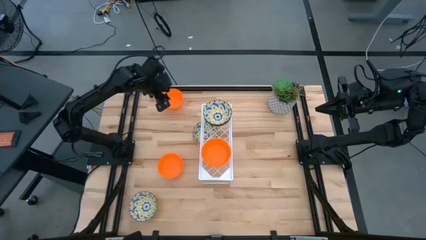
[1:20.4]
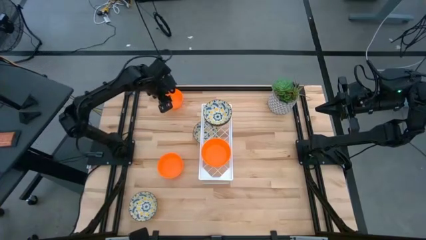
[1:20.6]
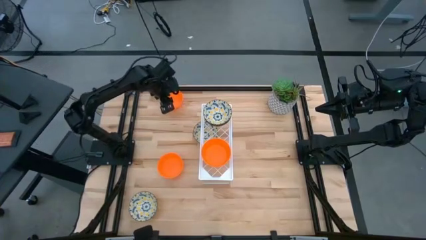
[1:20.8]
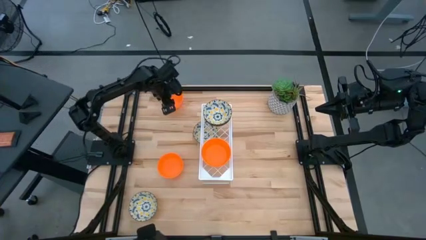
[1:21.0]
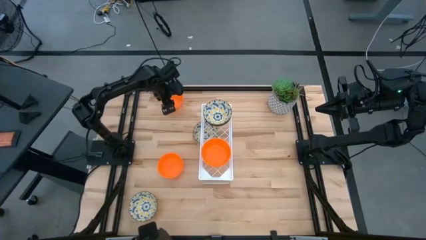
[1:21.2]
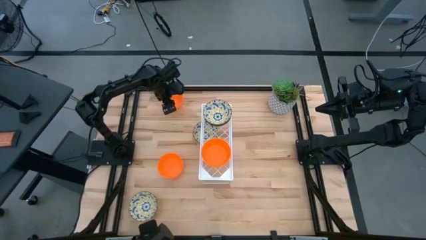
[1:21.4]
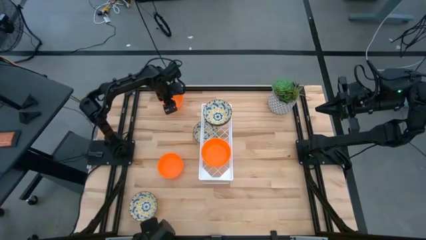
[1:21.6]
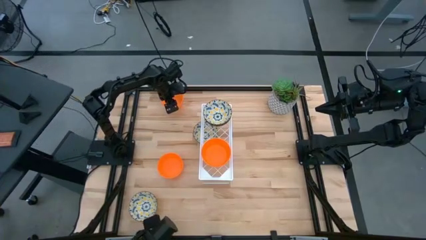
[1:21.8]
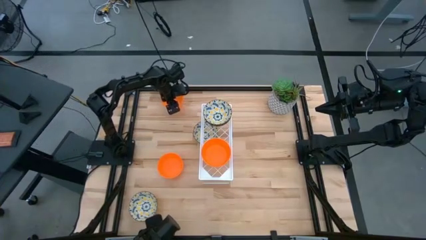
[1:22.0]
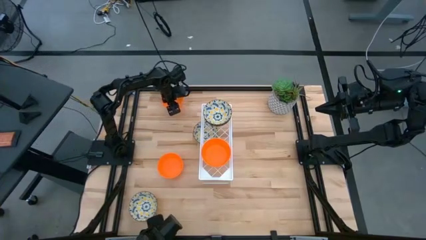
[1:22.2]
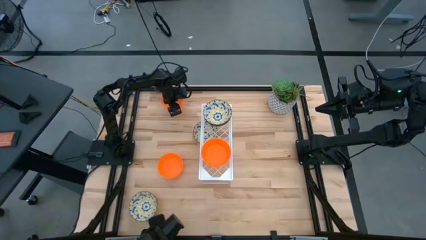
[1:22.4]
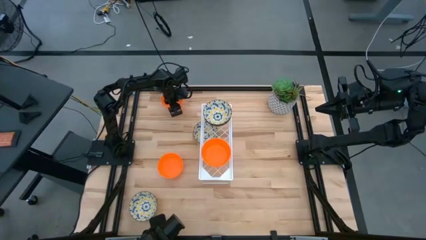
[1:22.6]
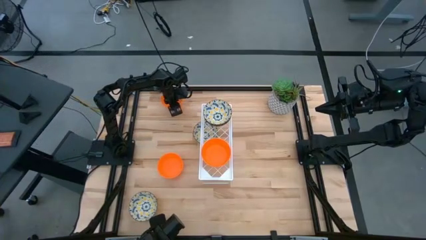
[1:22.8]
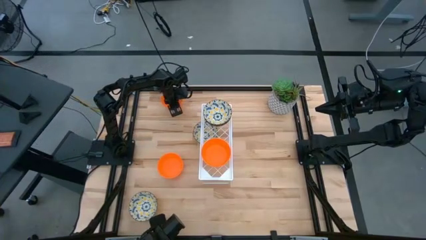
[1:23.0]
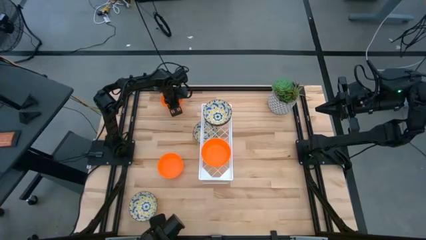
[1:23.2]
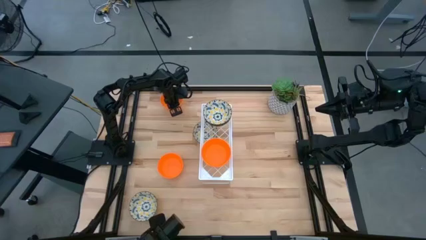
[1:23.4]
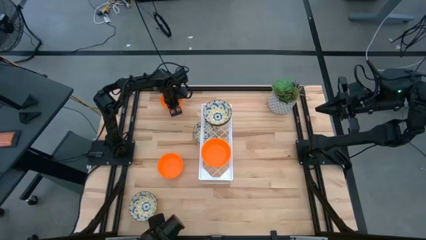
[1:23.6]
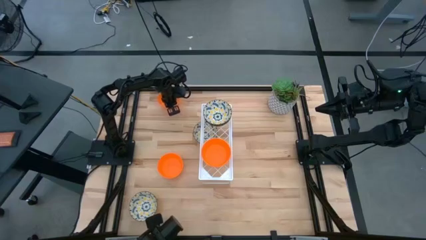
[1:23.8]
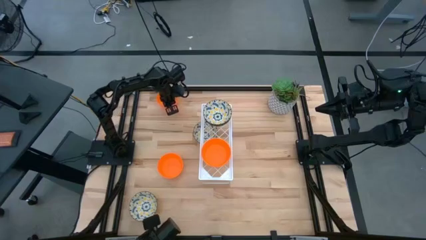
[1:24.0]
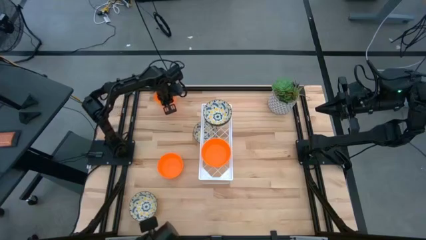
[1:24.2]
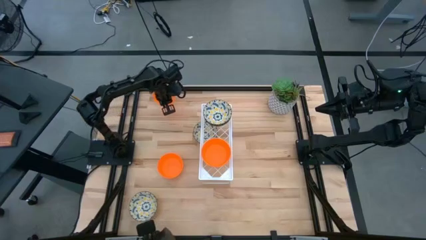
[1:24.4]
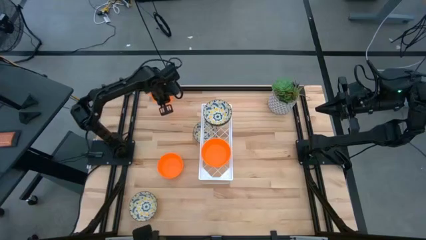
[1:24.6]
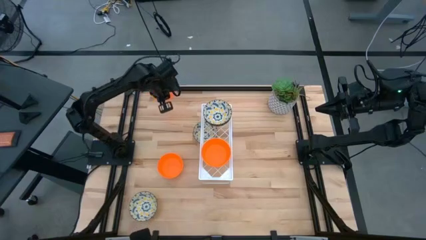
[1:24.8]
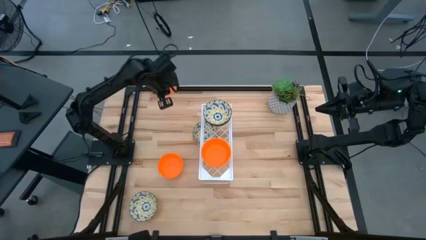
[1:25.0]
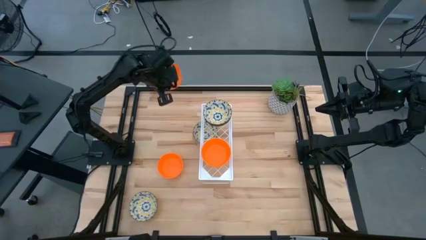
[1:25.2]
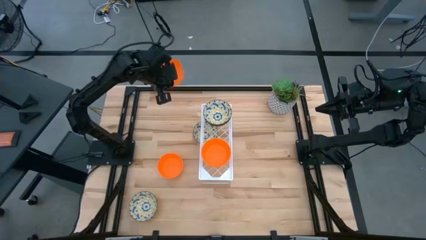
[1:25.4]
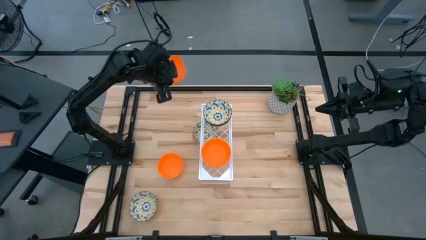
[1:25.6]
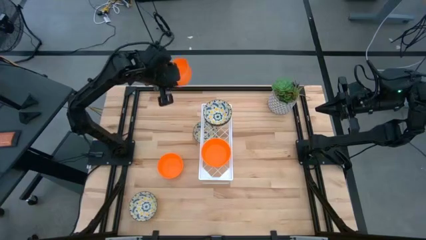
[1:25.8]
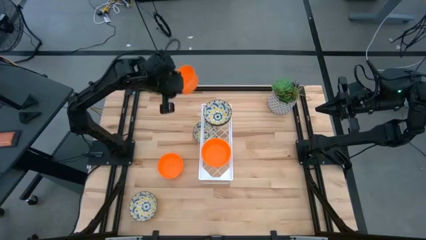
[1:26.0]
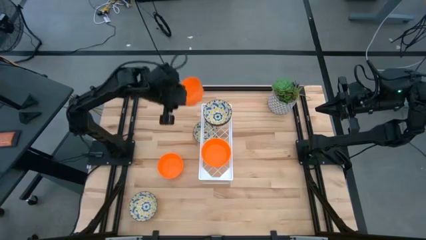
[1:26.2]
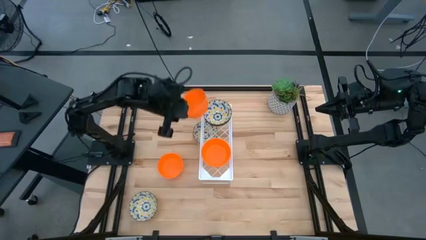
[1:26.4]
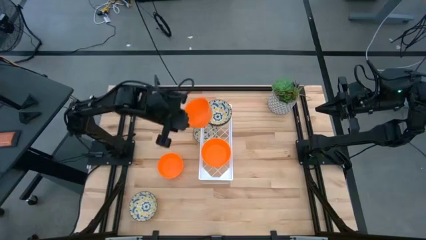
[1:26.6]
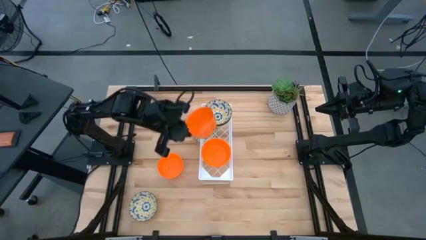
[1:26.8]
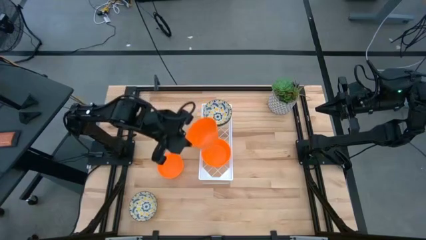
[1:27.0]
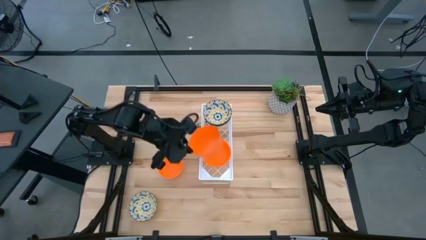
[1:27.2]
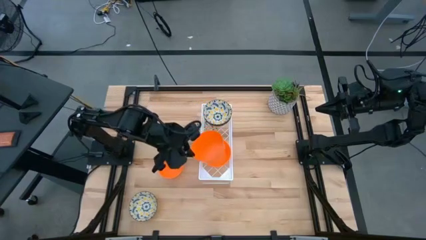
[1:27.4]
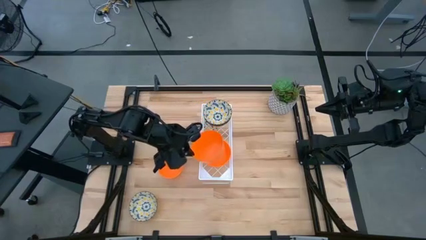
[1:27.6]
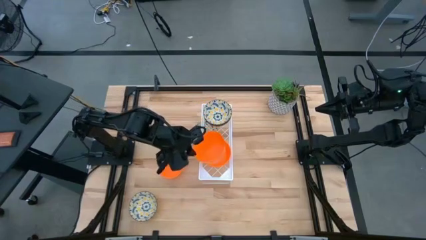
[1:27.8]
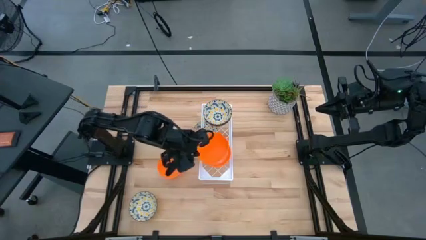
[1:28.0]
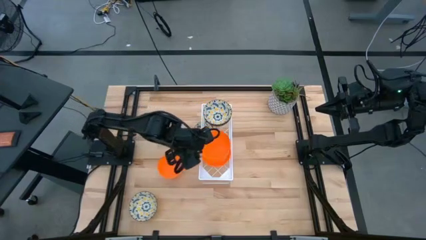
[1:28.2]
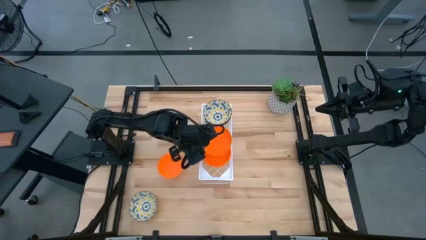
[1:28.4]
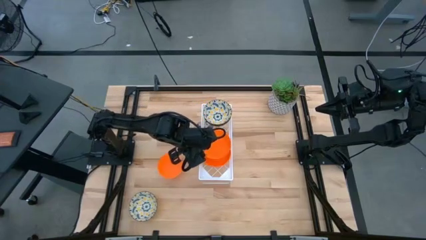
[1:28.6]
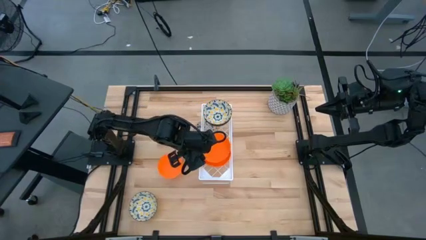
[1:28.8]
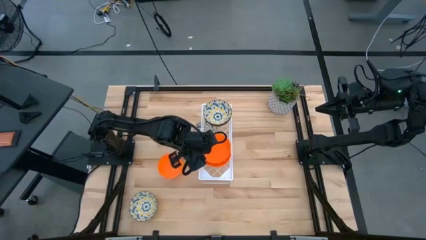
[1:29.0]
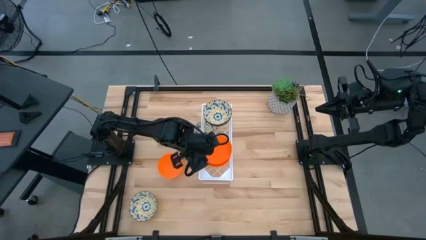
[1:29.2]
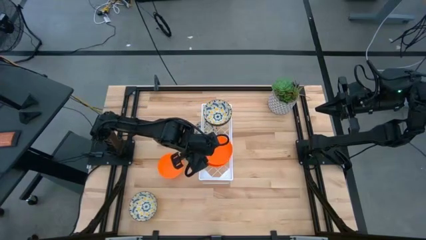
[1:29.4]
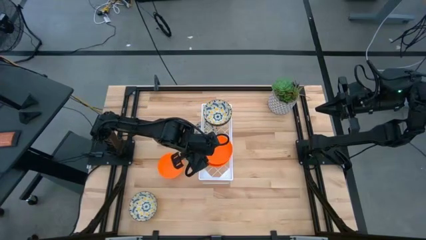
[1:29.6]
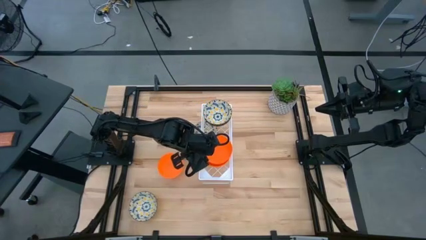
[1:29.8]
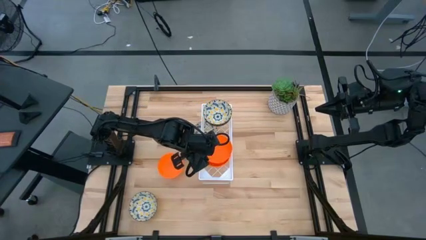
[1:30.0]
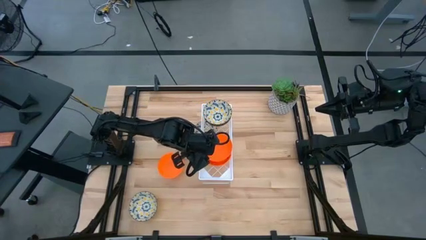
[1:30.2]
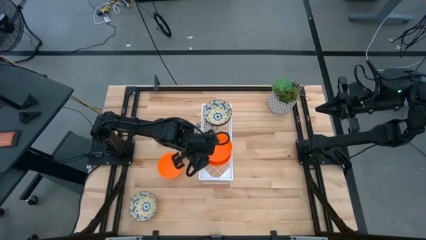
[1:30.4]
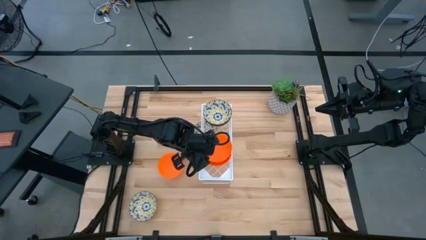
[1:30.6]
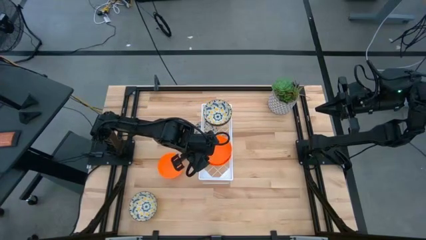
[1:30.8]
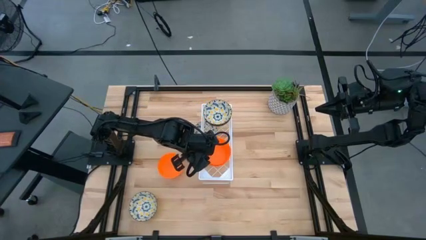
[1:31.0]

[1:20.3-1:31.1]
Task: Pick & Place Mini bowls
Stack the orange bowl on top of the orange bowls on the shelf

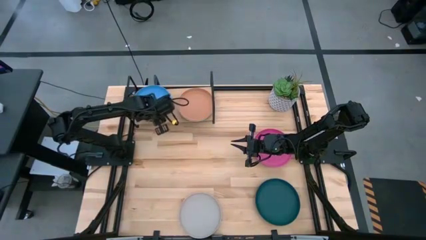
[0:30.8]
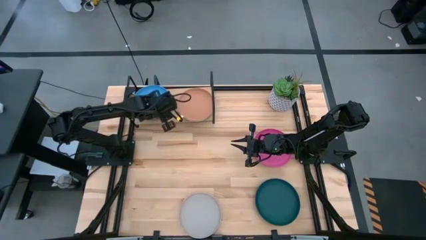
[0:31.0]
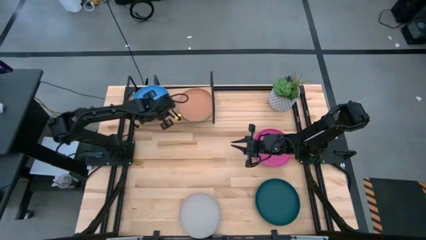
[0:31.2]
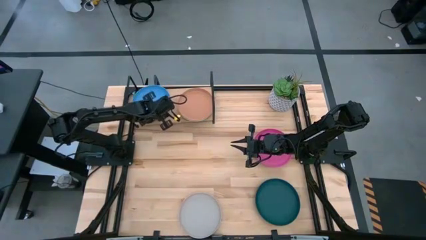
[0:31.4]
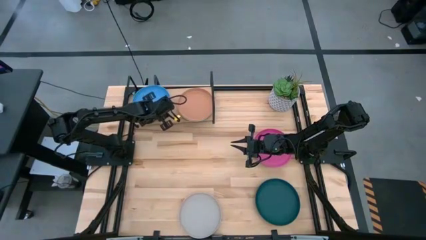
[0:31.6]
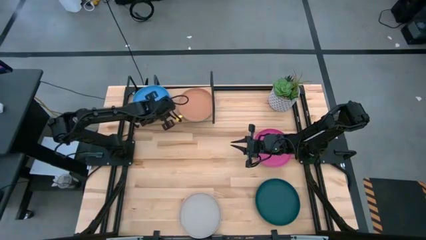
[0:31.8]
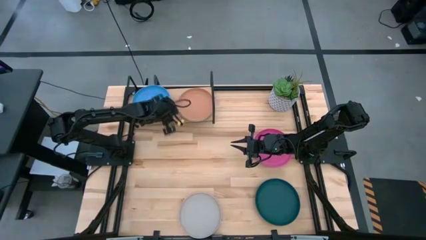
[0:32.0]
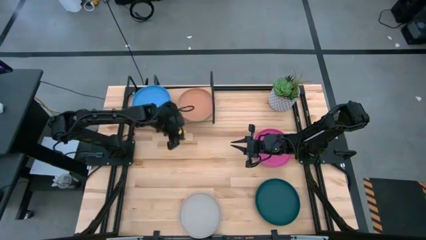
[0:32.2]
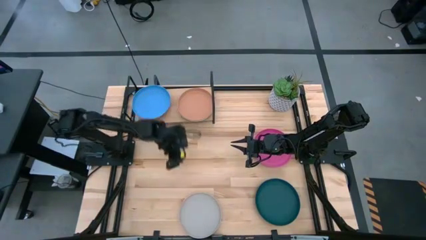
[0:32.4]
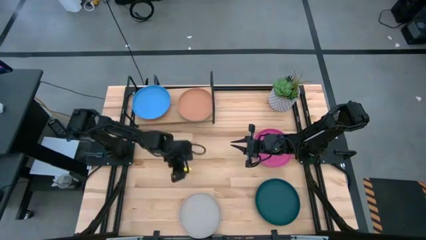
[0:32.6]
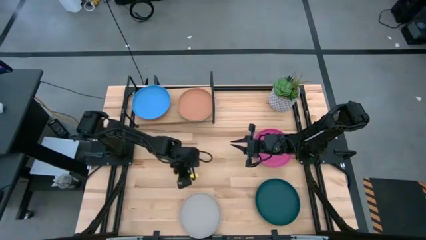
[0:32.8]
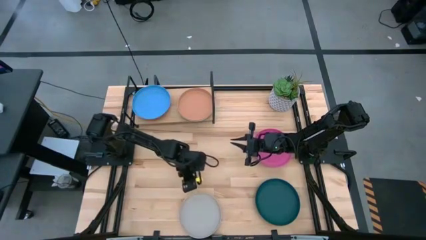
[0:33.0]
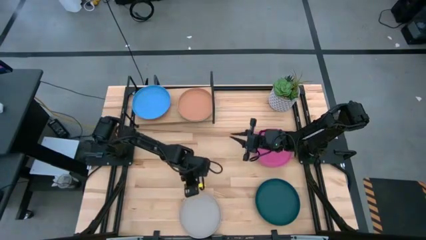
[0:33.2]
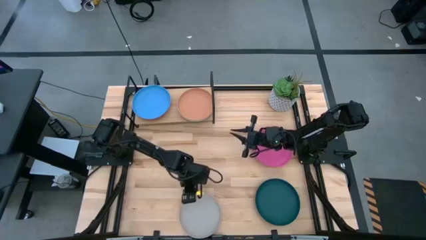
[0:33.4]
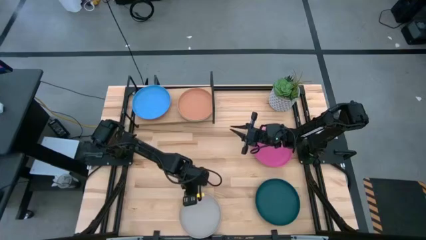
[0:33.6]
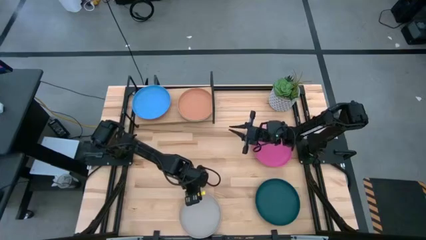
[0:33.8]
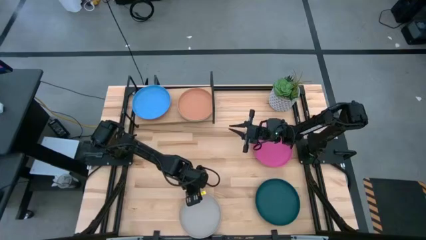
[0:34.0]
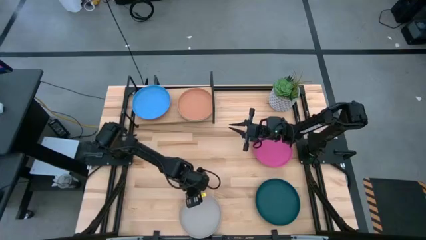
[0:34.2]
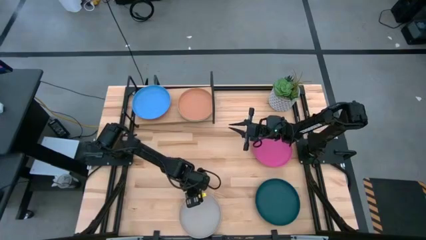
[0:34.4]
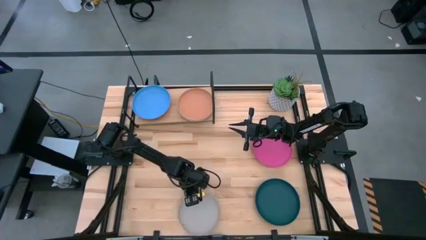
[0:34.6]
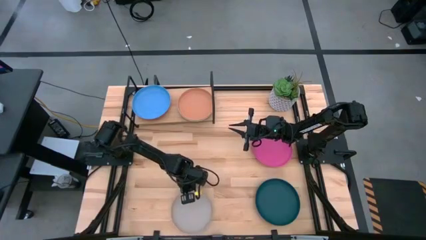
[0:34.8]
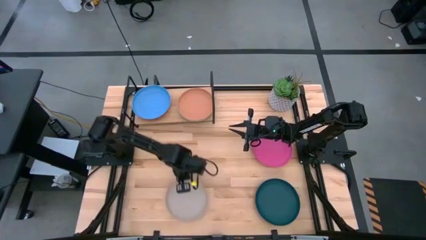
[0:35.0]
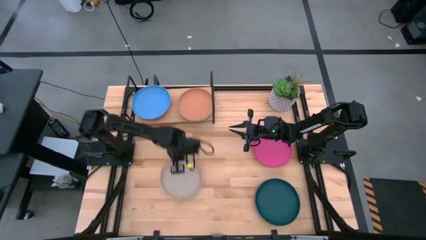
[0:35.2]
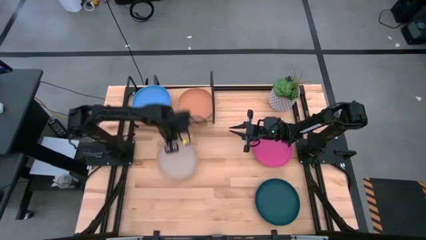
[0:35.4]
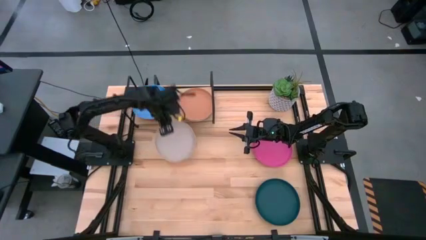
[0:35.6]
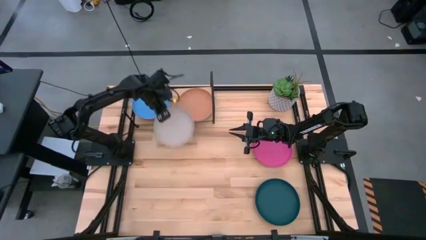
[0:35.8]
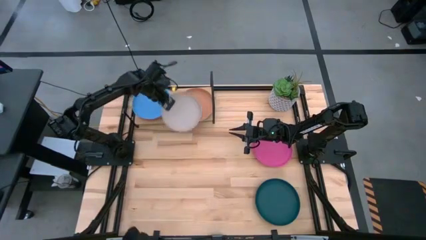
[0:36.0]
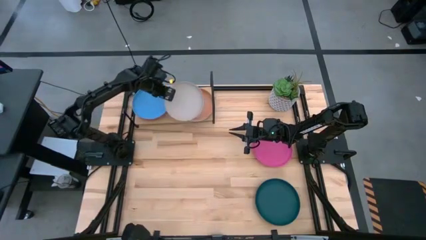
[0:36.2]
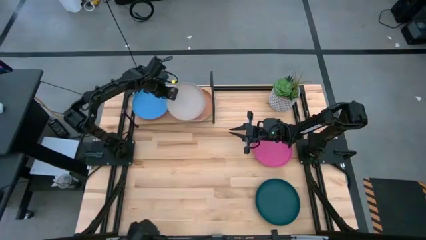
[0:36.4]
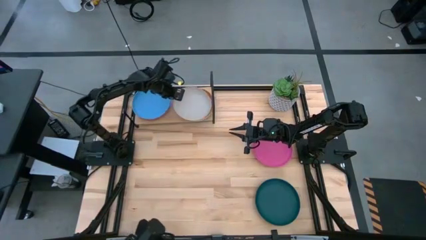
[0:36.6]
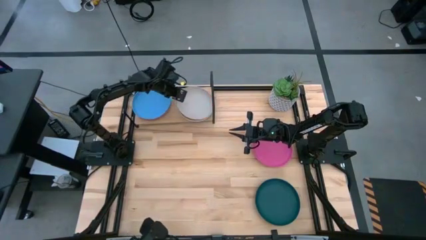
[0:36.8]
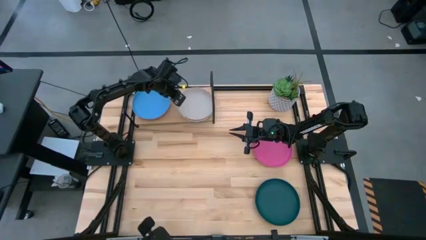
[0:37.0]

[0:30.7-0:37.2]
Task: Place and stack plates onto a shelf
Stack the gray plate on top of the brown plate on the shelf
